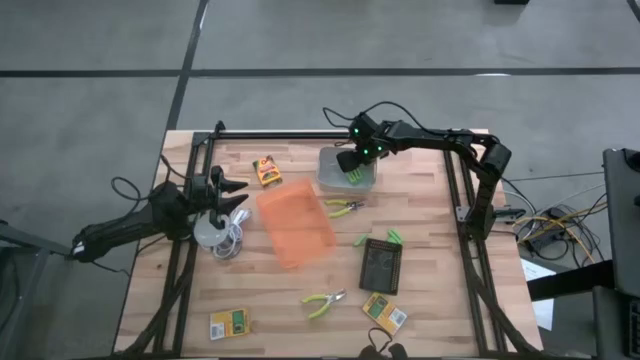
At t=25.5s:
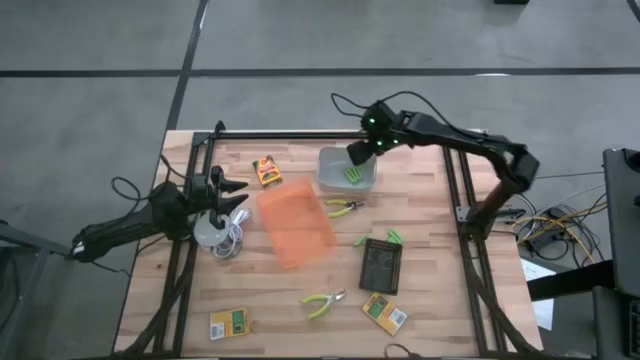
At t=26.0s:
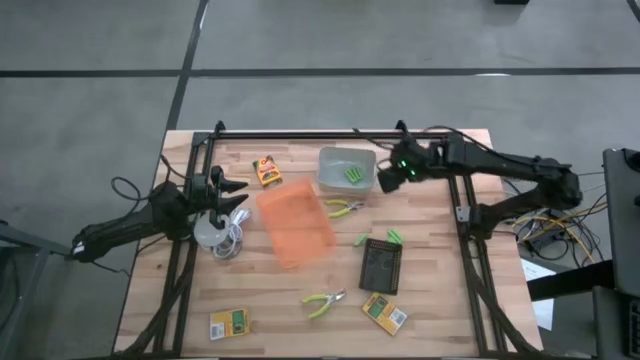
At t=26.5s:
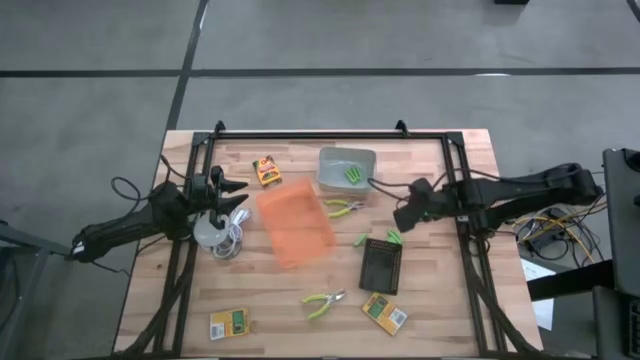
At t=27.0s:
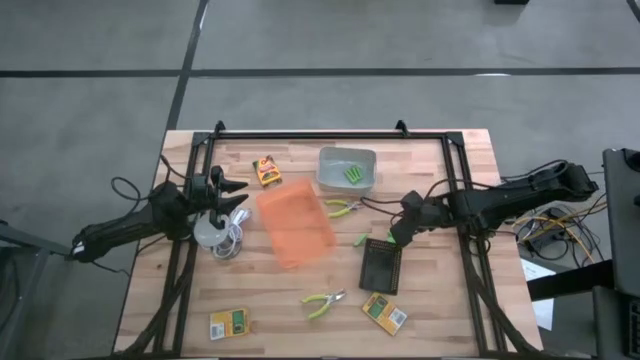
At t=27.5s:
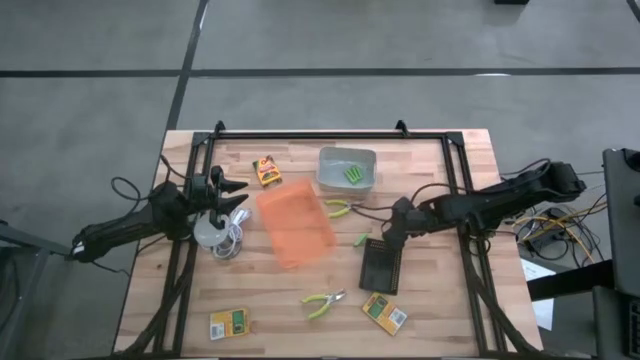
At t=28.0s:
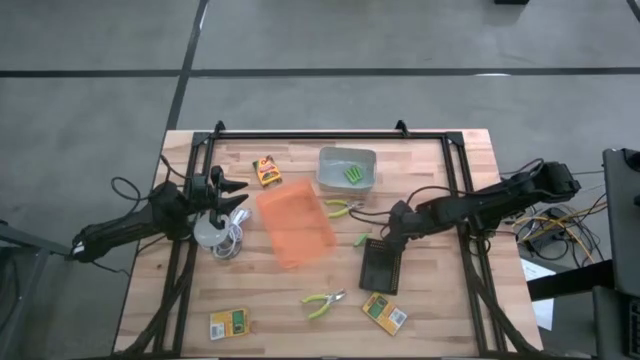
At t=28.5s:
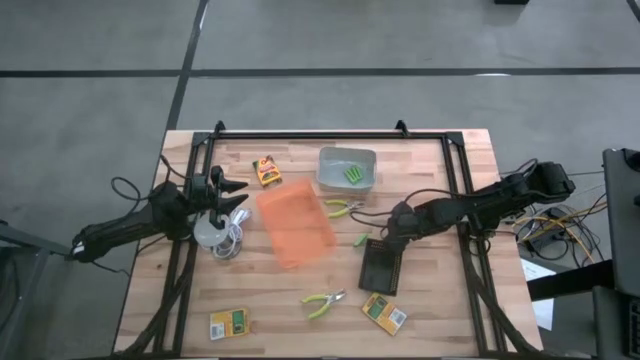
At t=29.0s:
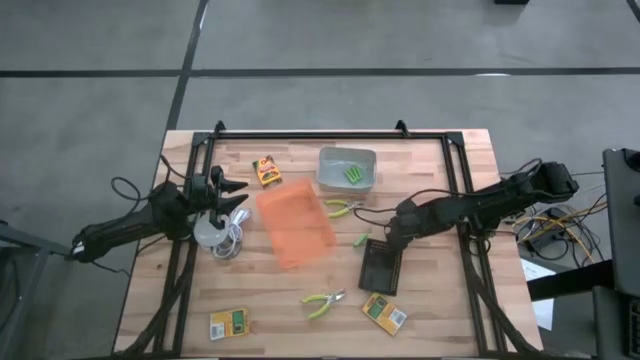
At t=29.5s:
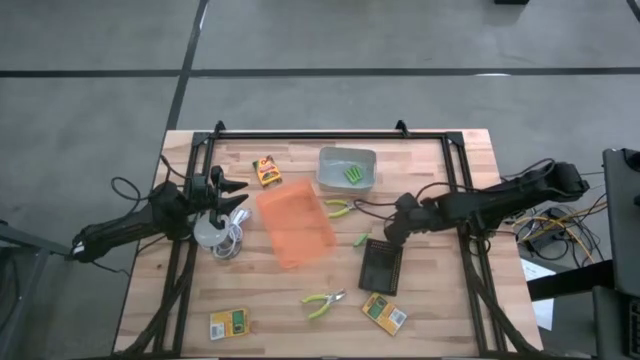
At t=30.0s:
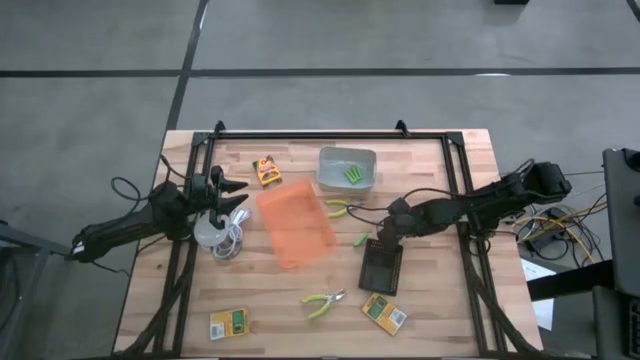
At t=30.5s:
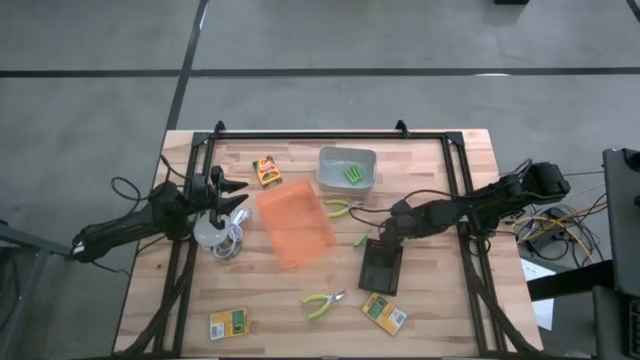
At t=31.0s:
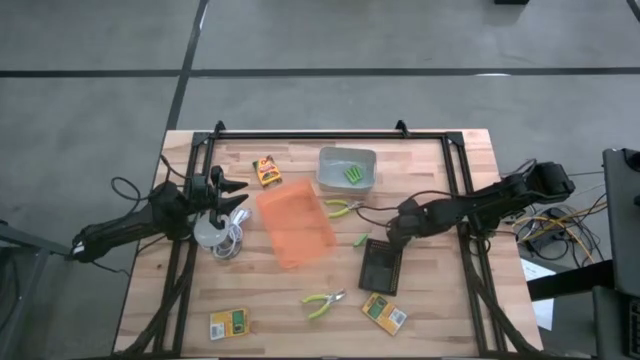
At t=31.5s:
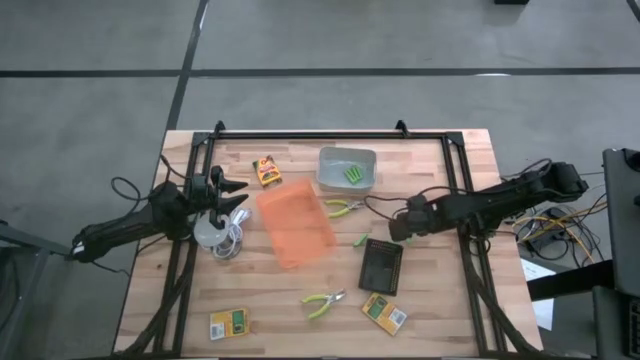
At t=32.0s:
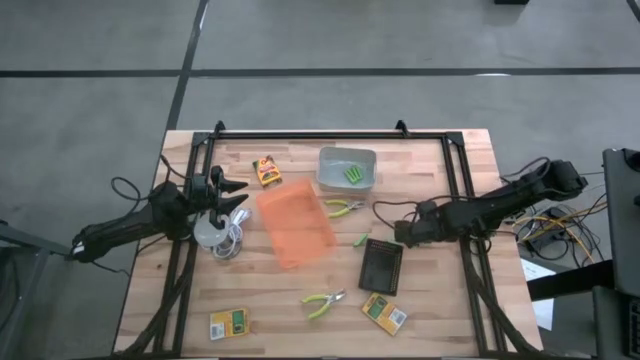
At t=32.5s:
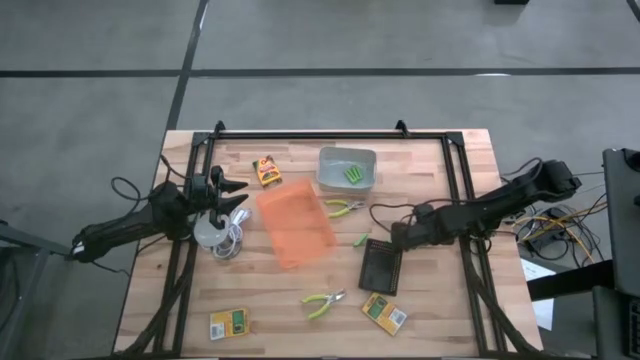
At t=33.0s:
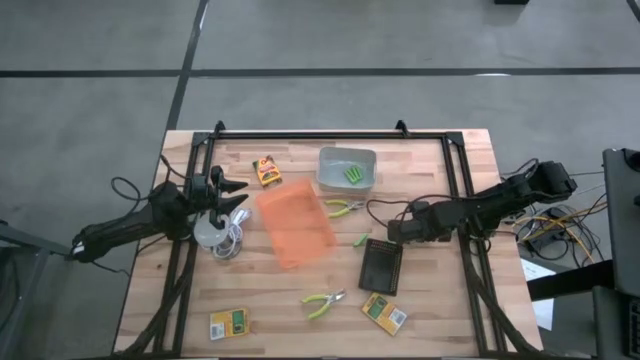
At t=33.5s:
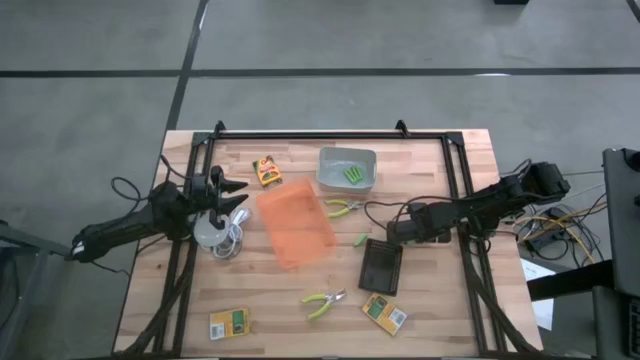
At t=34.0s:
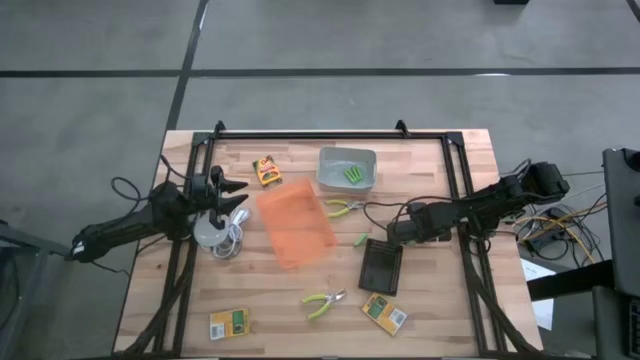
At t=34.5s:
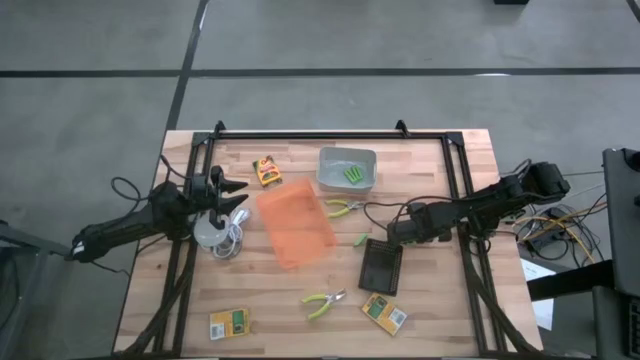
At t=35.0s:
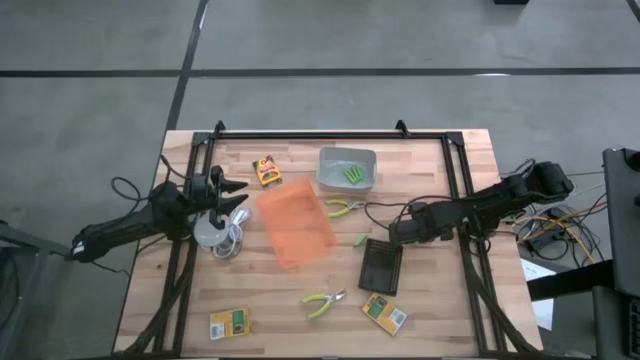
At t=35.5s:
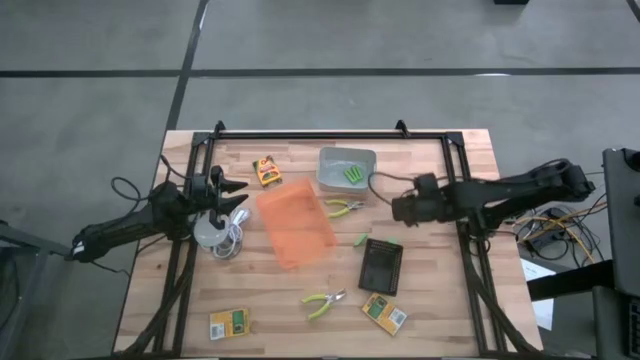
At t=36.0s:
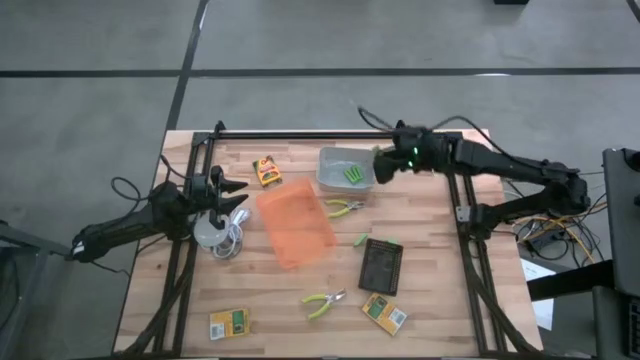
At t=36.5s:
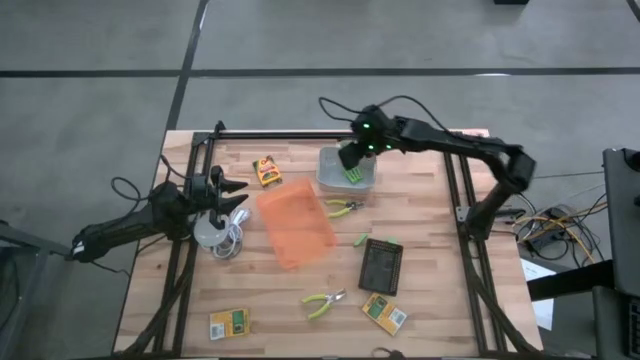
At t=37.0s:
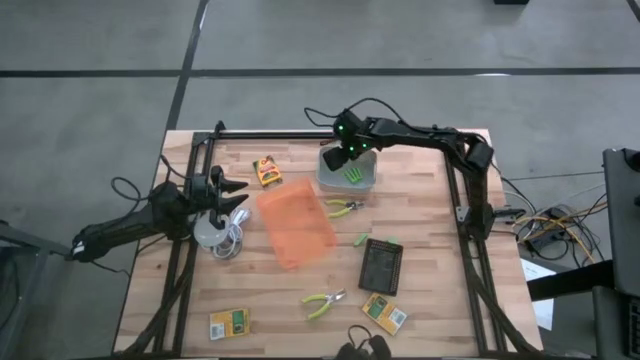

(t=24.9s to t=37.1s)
Task: Pick & Place School Supplies
Put the green eraser into the gray bin

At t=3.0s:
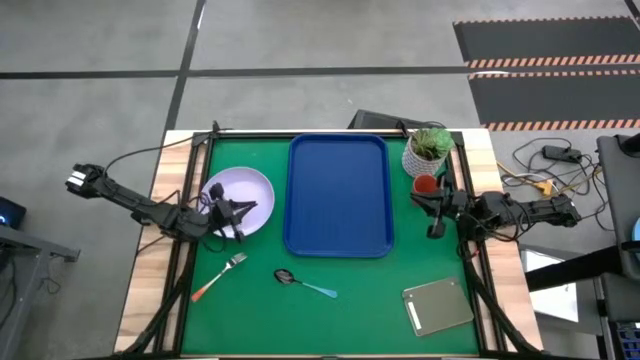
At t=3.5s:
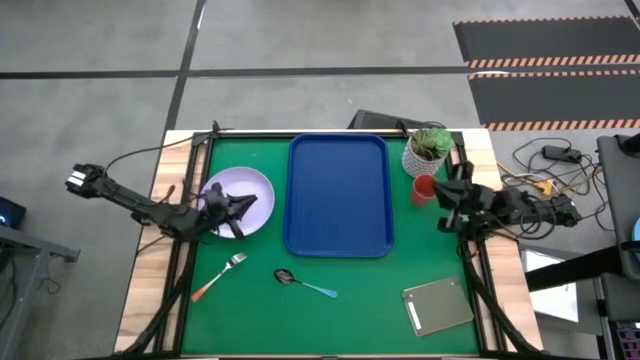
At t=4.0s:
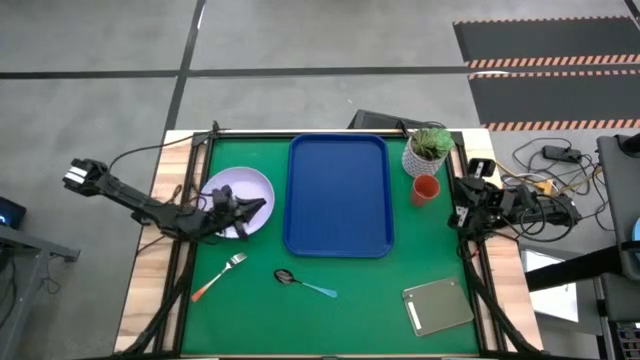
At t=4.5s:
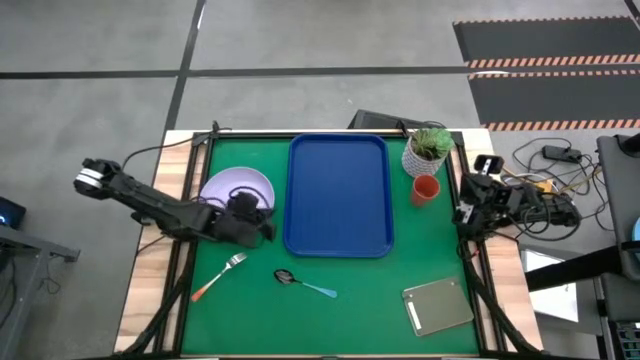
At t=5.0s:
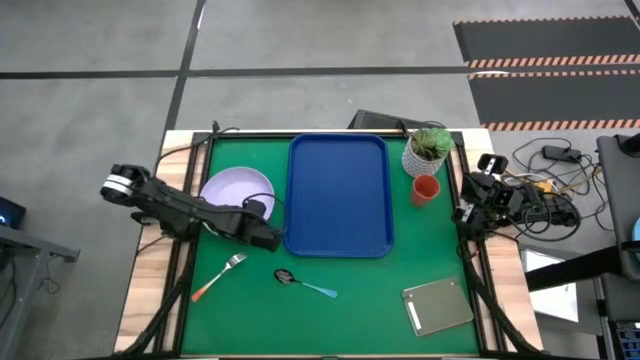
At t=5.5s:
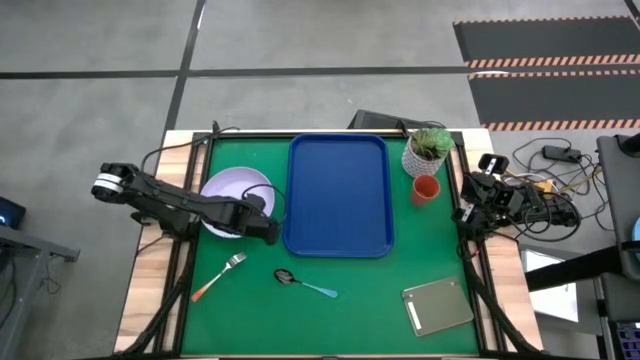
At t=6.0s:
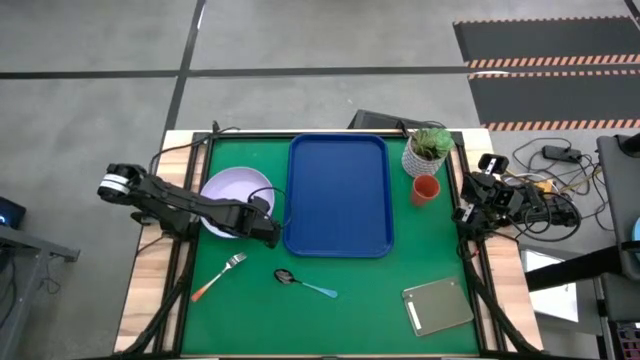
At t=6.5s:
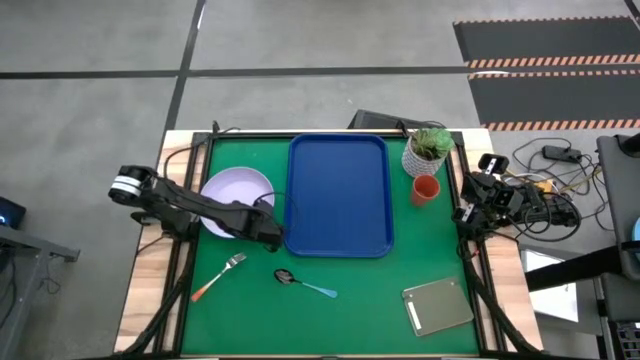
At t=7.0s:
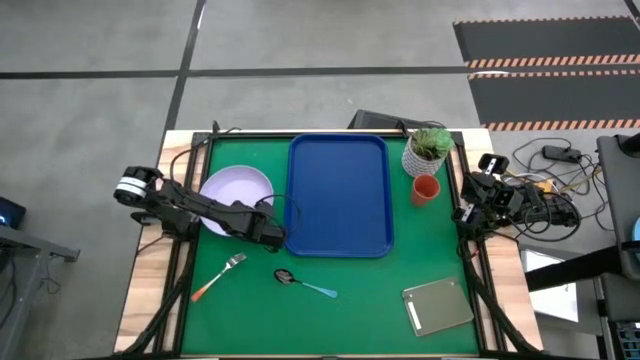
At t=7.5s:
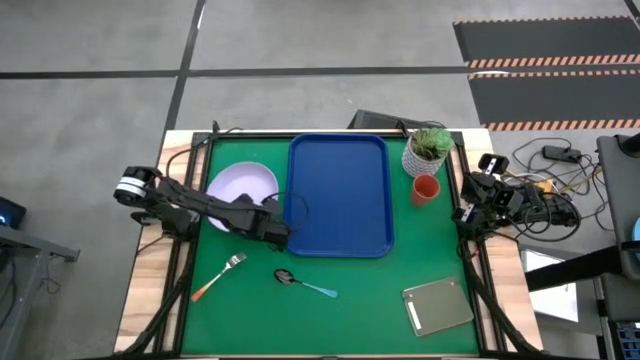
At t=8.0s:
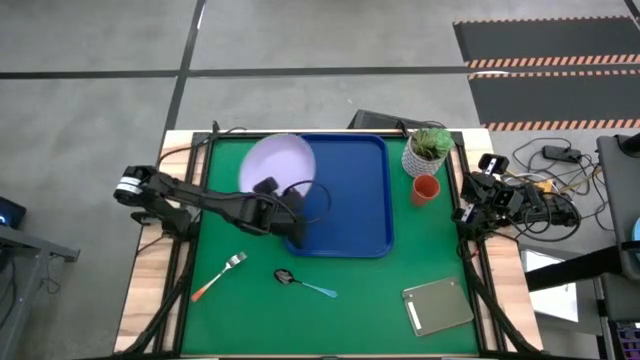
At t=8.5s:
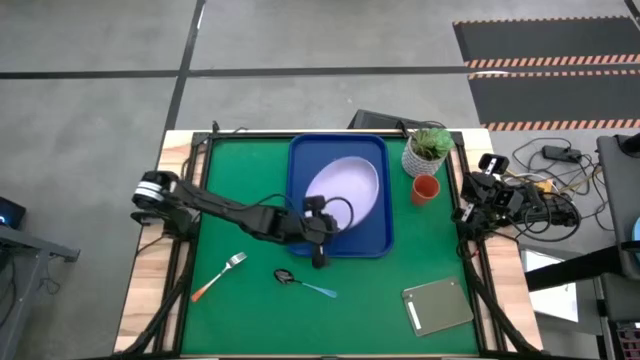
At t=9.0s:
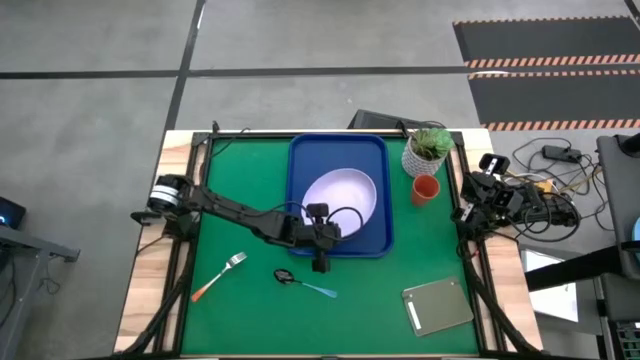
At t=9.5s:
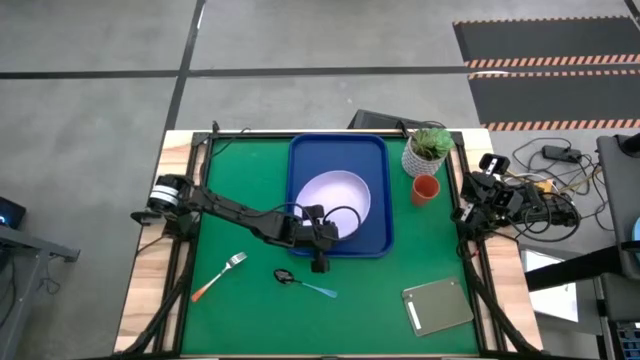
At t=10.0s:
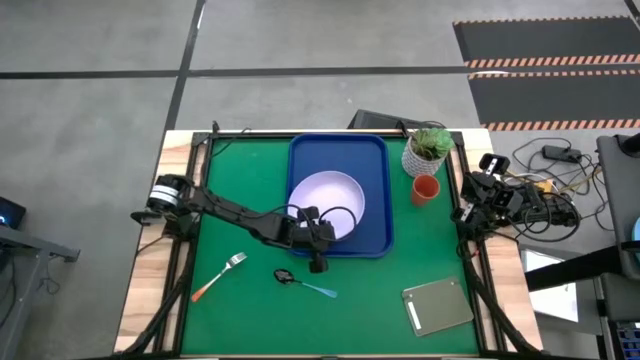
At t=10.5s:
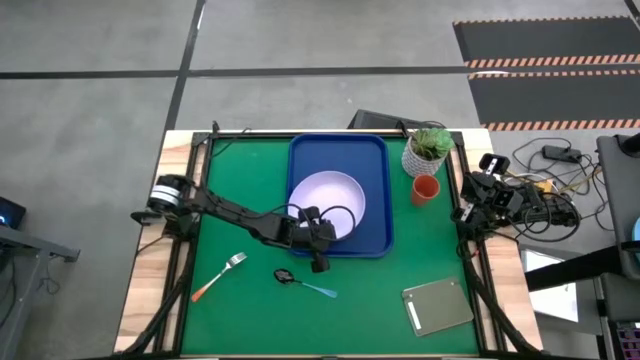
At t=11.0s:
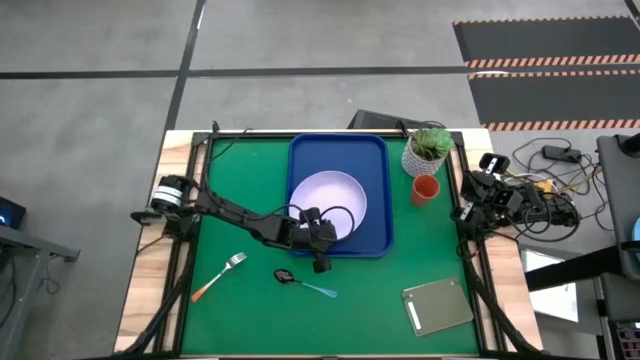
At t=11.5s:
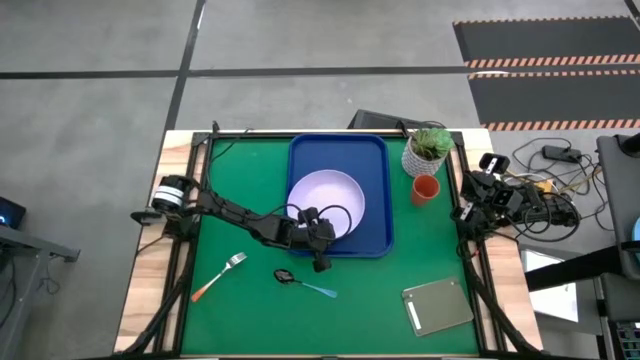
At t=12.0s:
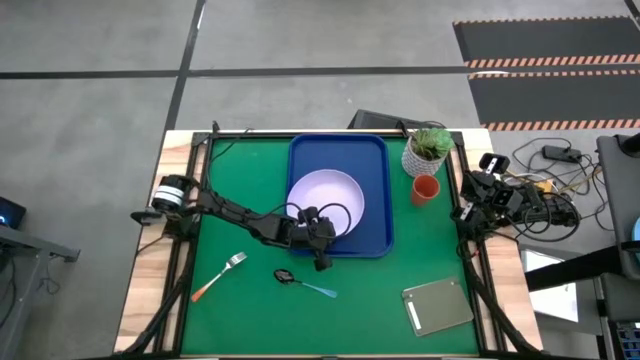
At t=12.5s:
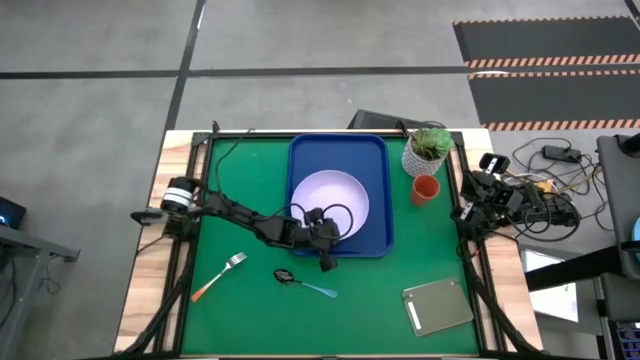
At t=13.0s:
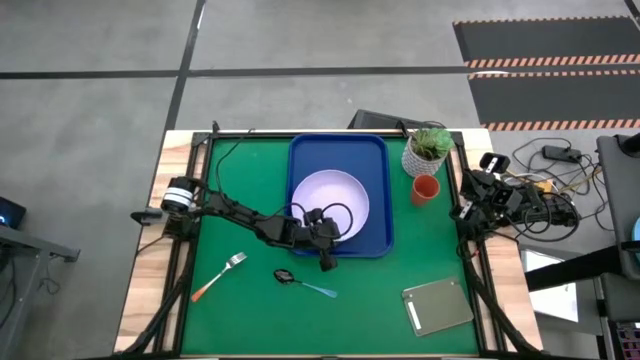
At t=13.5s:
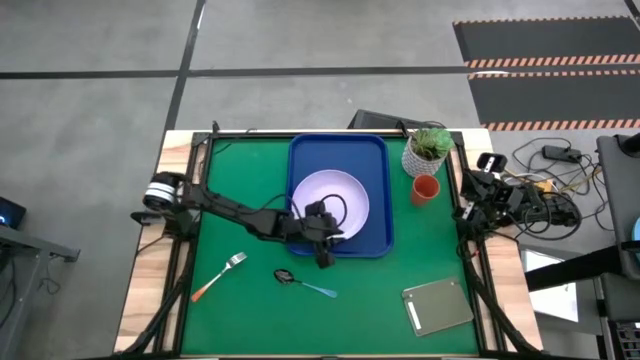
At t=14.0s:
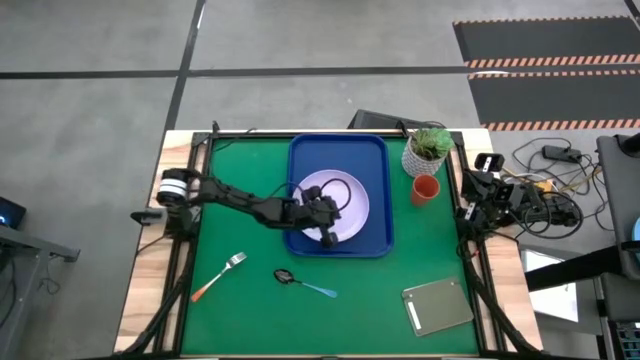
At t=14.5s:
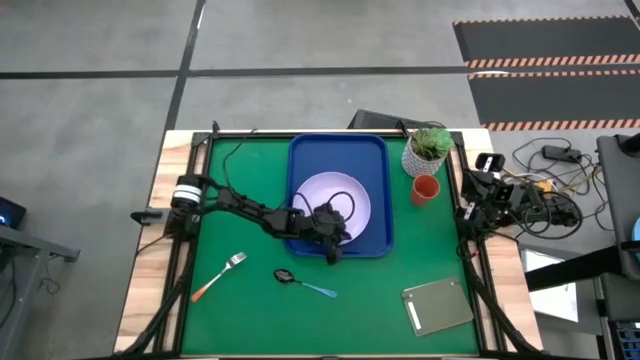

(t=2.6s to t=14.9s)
Task: Pick and place plate/cup/fork/spoon on tray
Put the white plate on the blue tray
